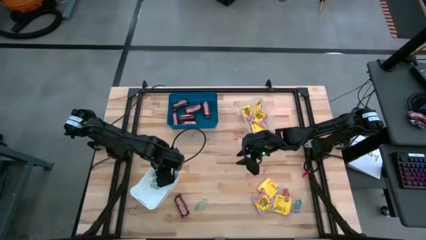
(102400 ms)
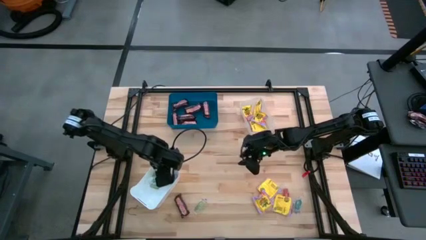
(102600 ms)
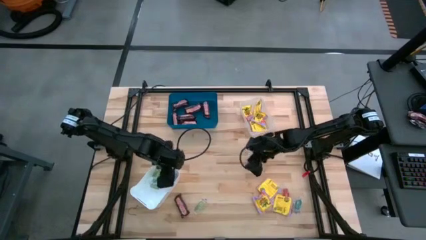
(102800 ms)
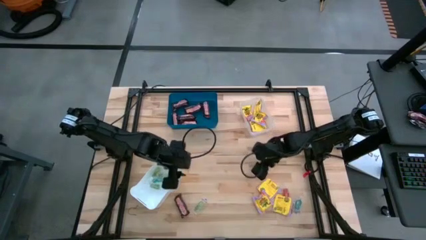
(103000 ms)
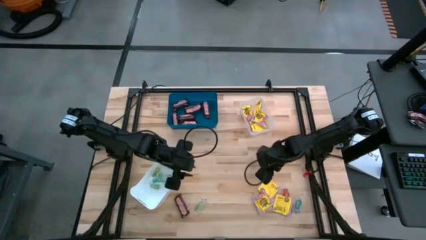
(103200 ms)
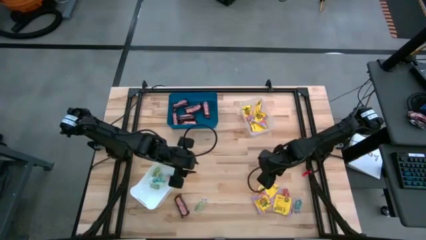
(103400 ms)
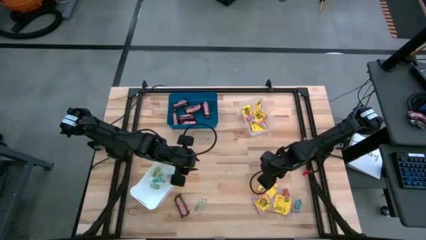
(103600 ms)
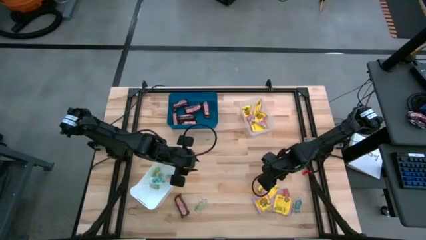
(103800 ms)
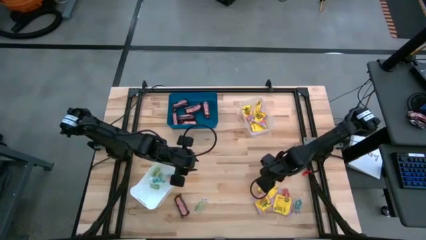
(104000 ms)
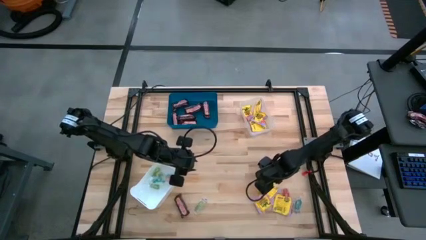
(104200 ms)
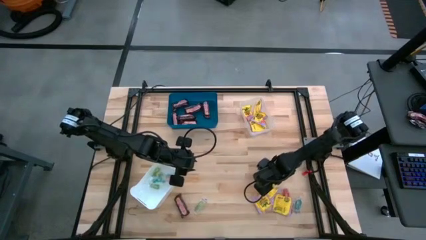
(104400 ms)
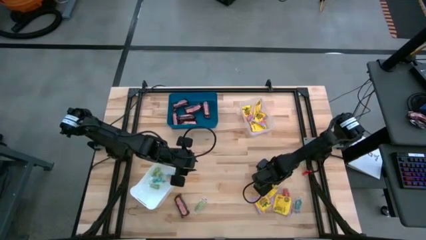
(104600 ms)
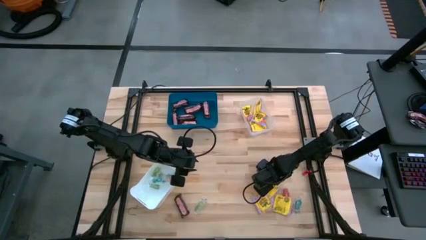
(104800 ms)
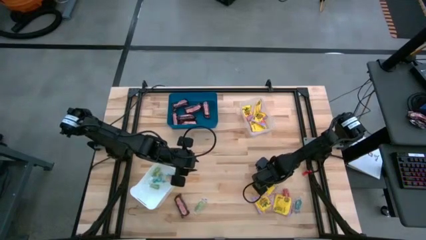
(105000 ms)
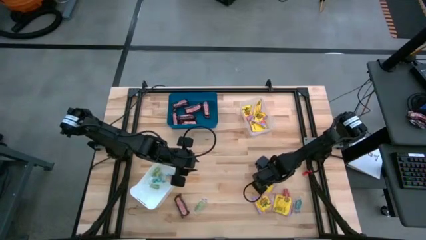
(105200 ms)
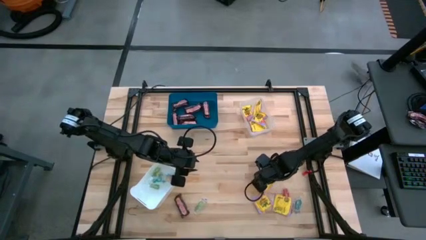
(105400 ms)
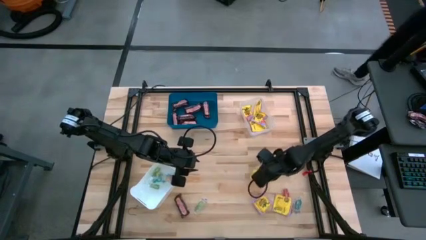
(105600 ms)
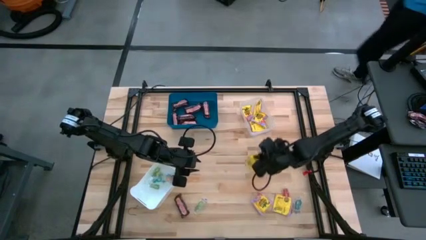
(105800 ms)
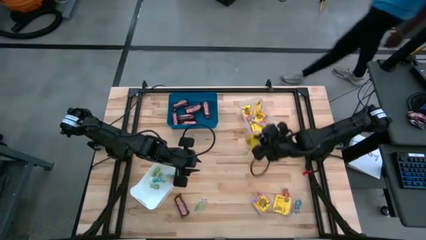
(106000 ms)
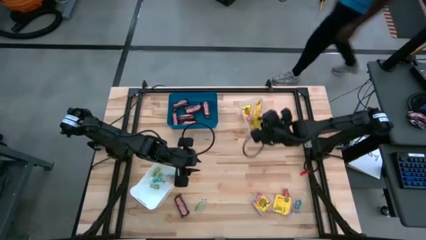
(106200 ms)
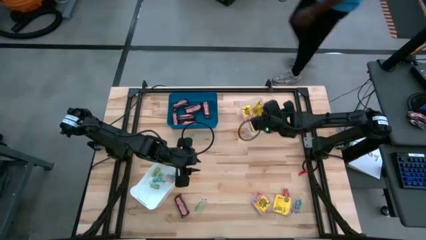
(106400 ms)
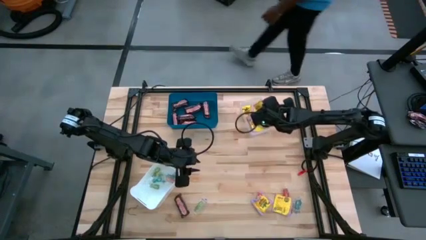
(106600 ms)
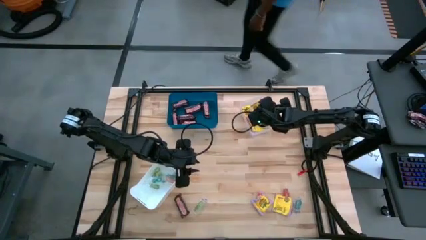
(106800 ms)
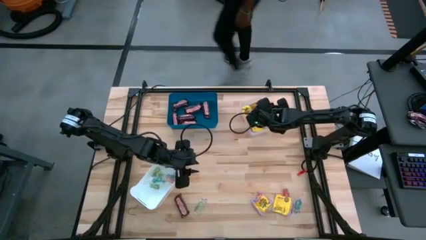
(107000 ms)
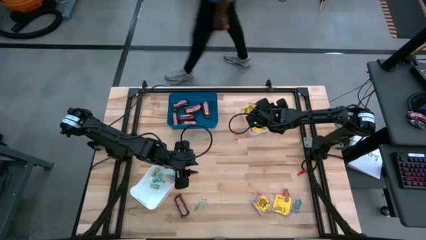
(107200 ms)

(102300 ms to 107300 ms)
Task: Sort candy
Put the yellow candy into the transparent bin

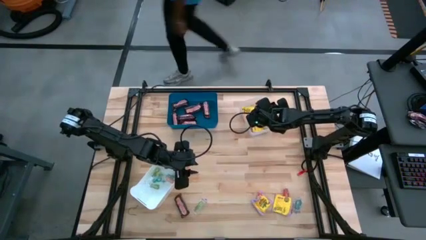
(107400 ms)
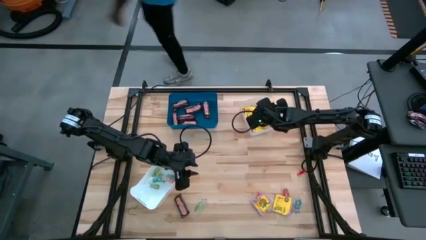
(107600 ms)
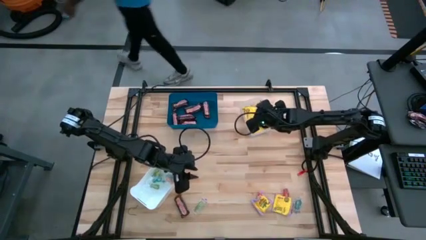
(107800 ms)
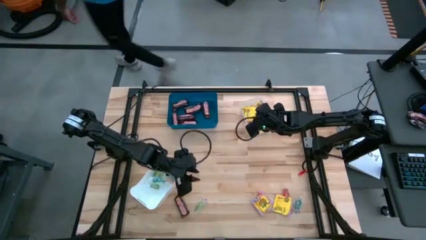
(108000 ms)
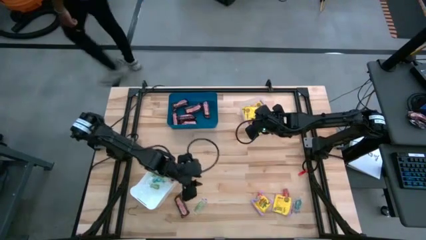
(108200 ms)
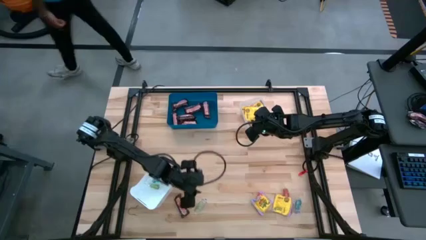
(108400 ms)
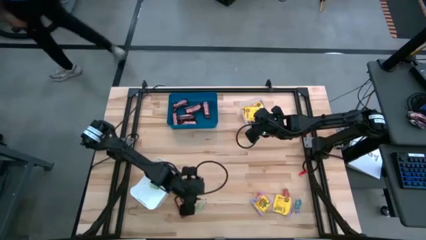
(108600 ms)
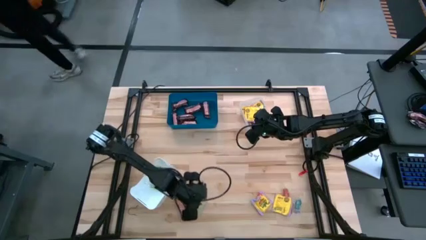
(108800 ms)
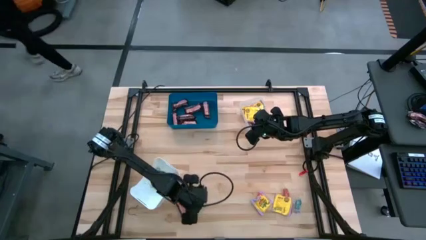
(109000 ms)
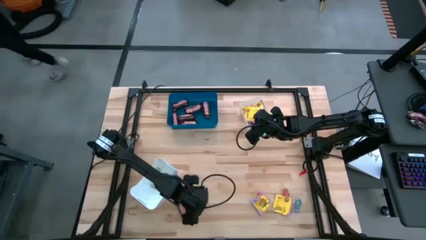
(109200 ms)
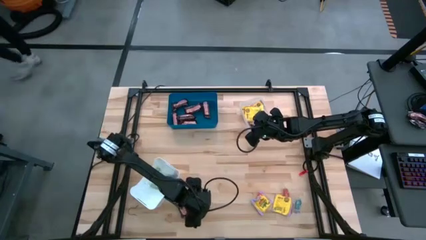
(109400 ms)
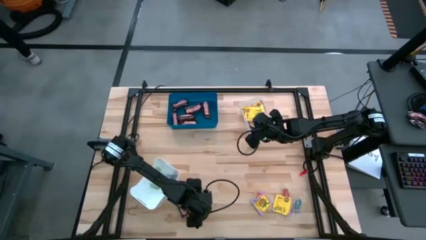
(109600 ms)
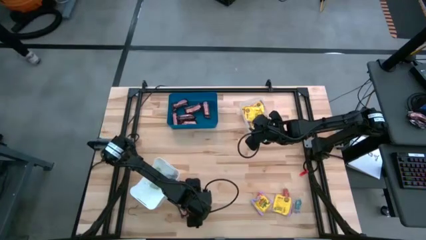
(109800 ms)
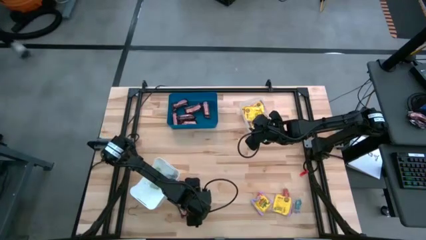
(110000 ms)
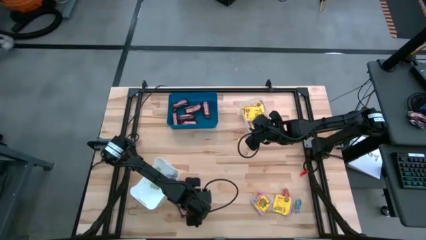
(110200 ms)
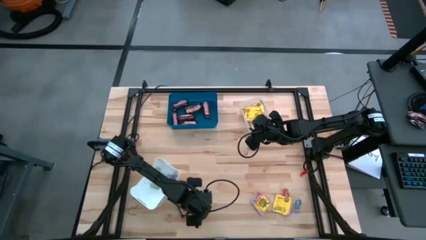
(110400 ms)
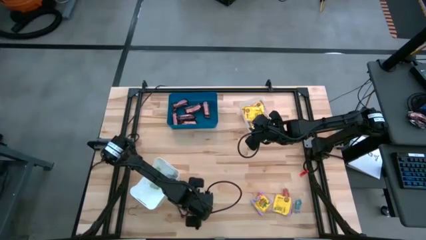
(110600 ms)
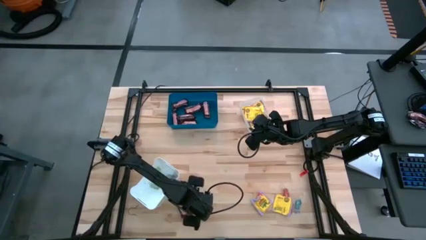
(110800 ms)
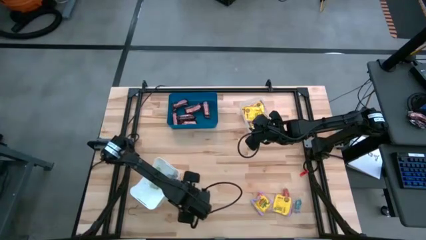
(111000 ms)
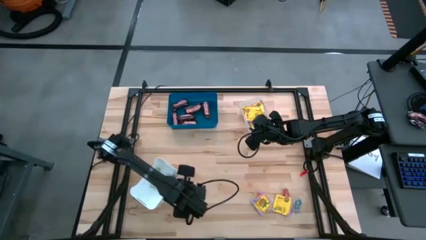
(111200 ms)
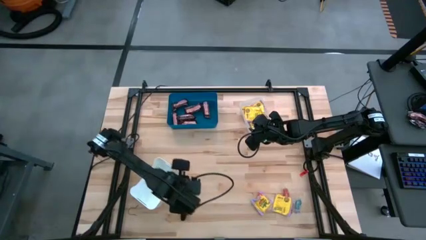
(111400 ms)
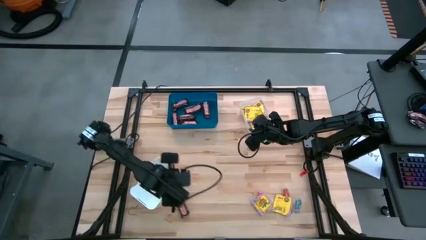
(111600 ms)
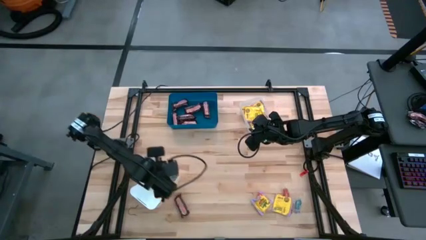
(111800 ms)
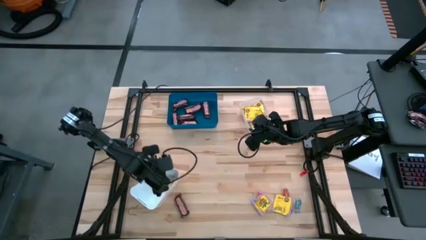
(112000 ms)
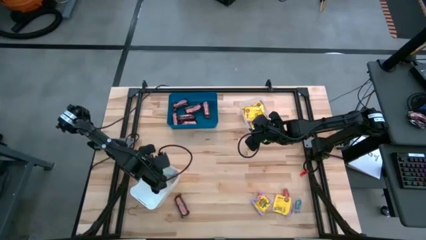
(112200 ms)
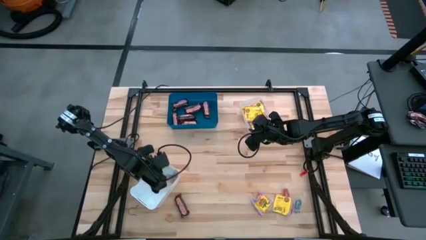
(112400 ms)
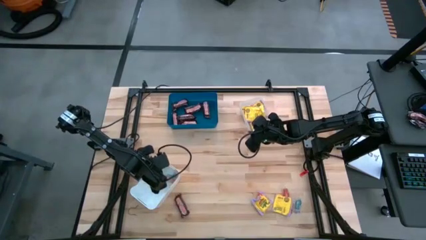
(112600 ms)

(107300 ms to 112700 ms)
Put the green gummy into the white bin

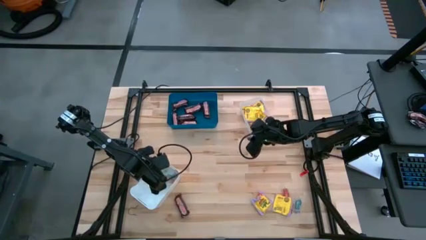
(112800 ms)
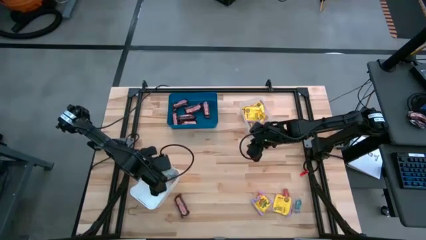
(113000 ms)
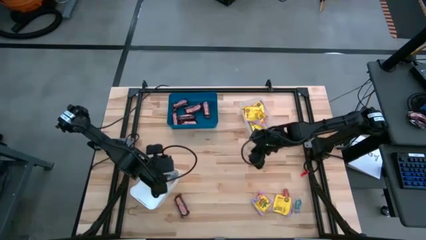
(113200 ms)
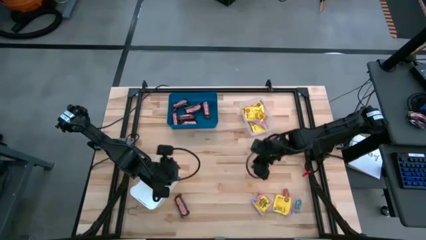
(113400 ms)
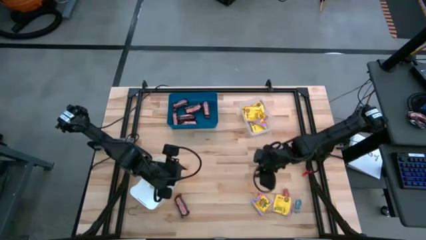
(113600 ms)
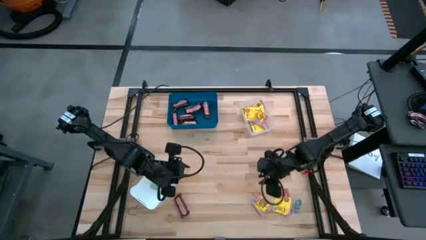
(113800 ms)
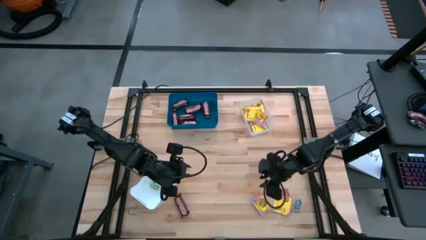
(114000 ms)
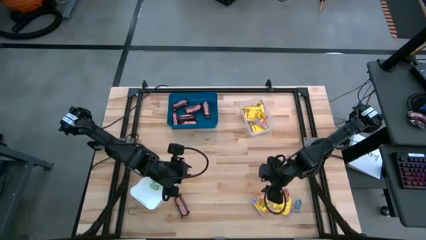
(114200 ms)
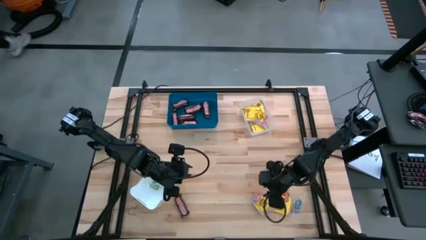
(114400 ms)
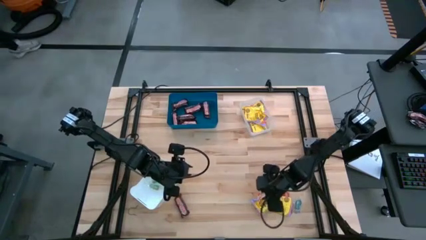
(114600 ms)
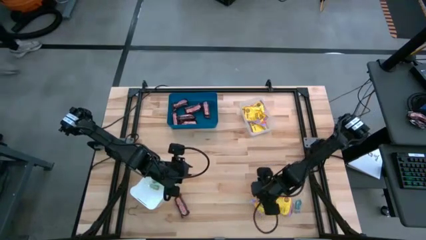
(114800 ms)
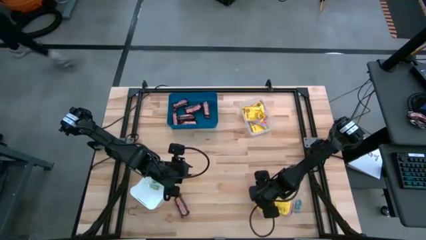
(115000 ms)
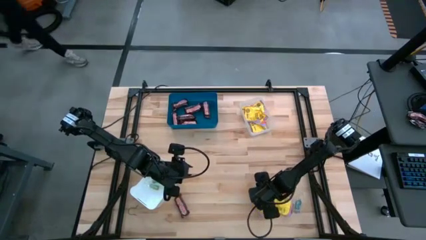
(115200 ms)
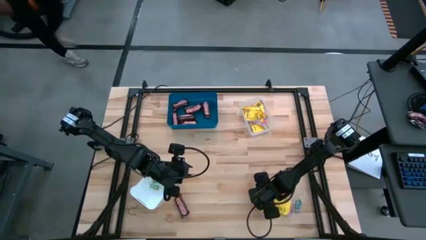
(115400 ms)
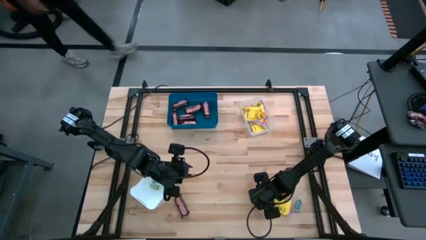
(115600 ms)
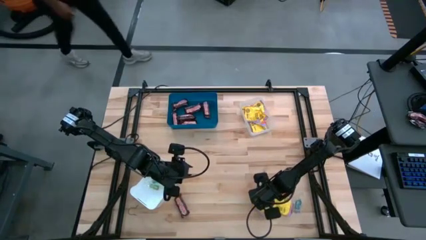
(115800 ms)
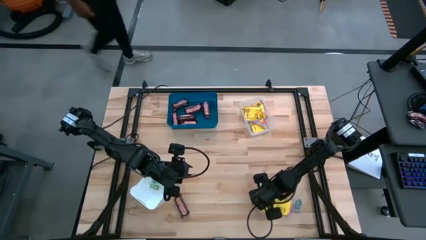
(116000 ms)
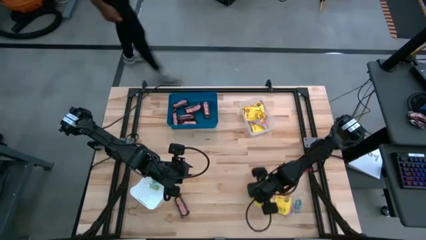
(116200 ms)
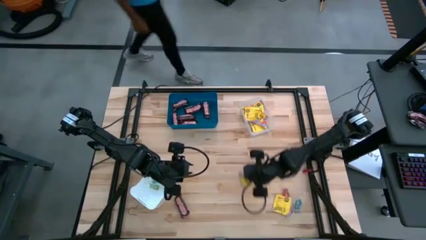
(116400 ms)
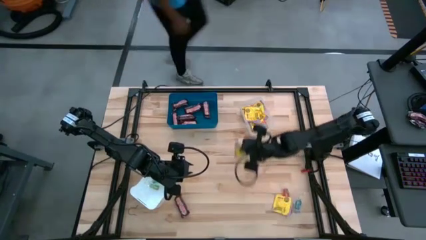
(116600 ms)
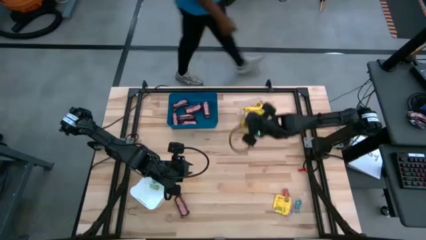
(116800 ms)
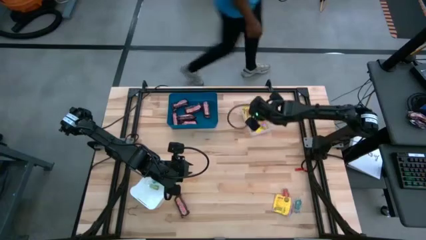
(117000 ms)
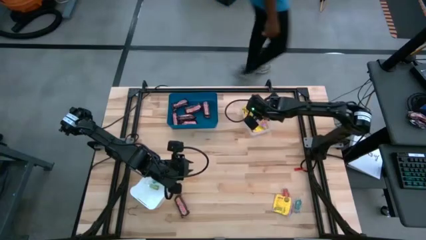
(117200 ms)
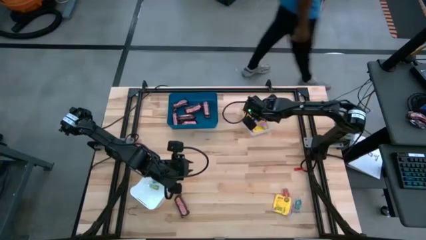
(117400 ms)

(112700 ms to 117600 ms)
Put the yellow candy into the transparent bin

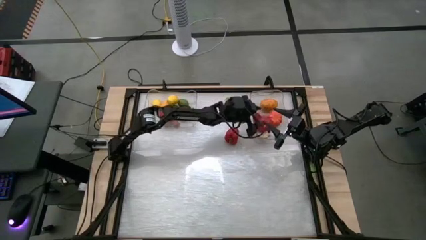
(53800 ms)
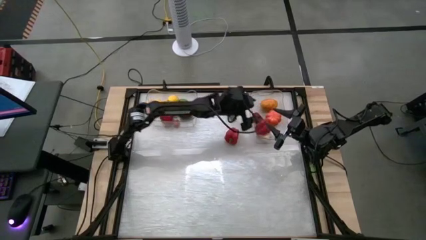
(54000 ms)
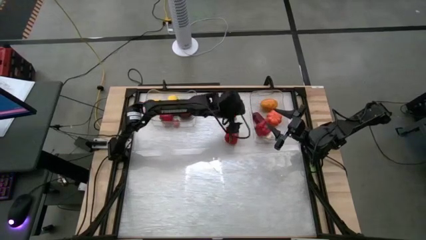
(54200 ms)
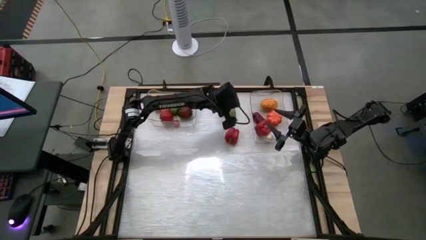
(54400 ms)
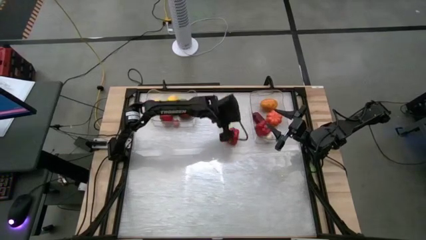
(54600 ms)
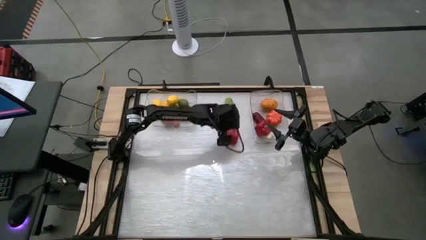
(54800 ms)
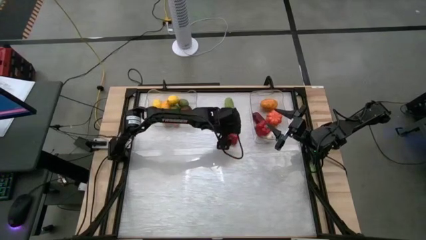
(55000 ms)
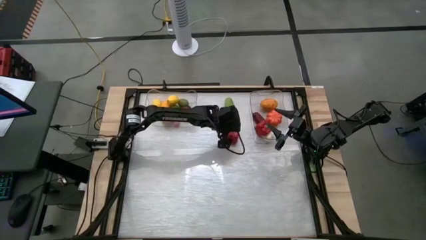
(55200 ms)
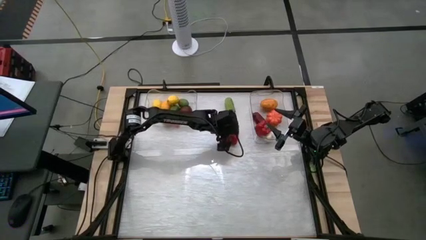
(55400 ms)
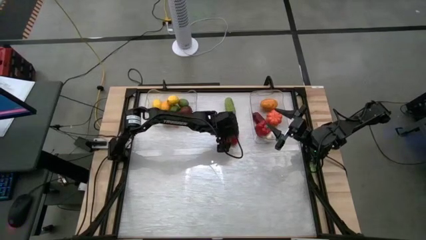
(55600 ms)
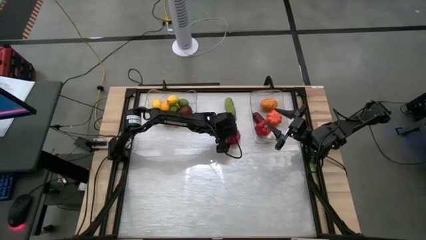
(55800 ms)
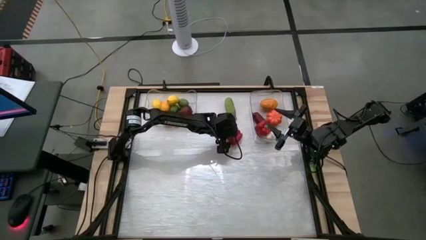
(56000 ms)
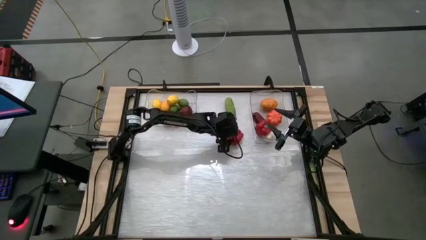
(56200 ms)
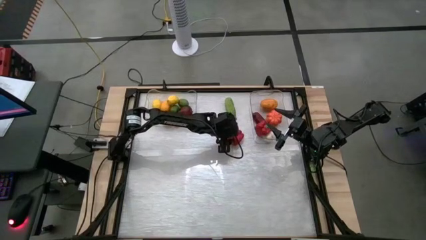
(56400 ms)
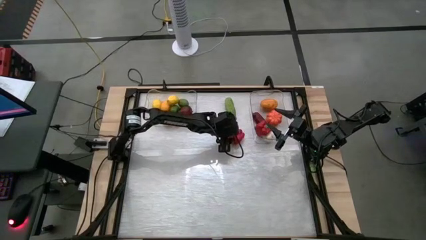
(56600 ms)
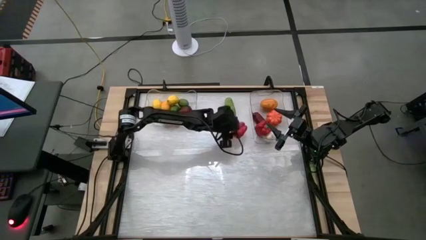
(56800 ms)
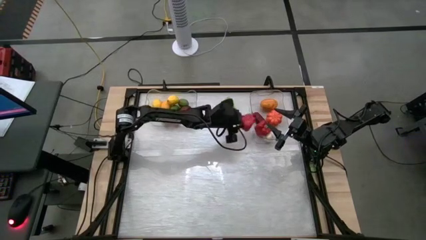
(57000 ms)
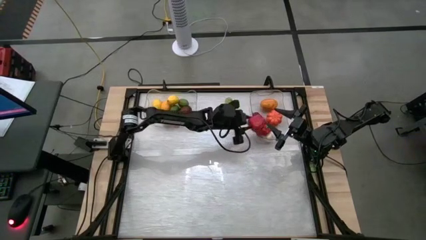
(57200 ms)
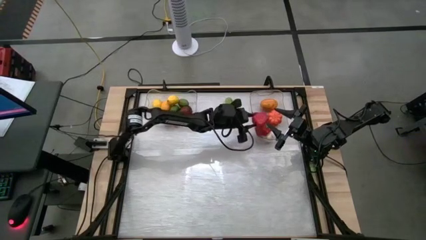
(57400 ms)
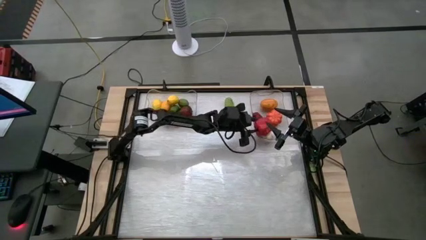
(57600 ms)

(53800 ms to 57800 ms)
Task: Sort produce into baskets
Put the red bell pepper into the right transparent bin
